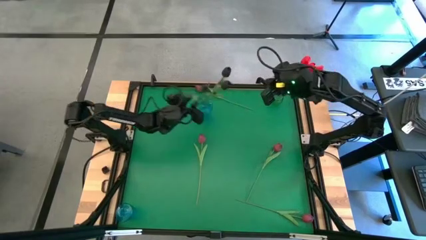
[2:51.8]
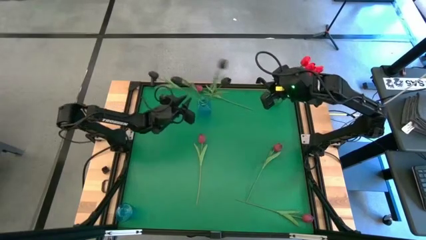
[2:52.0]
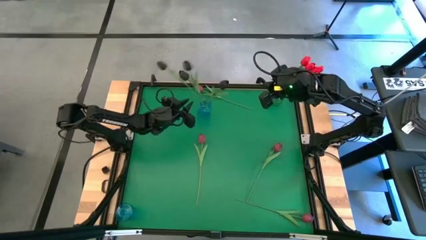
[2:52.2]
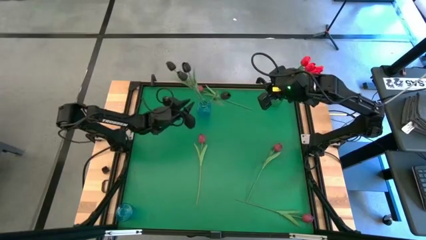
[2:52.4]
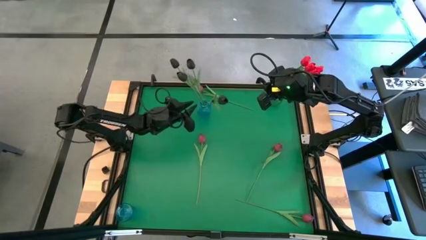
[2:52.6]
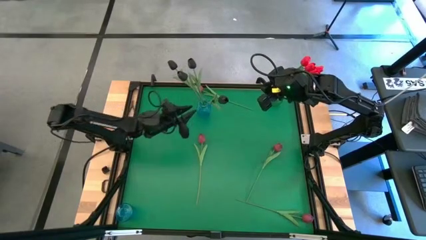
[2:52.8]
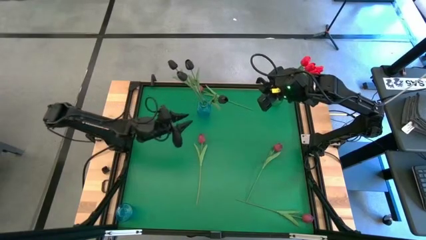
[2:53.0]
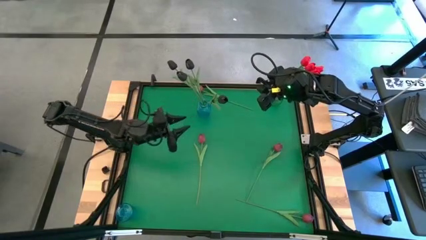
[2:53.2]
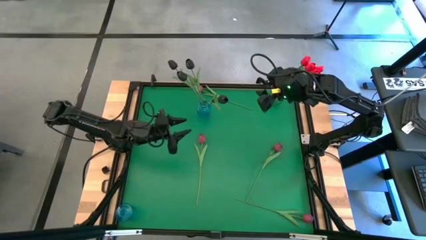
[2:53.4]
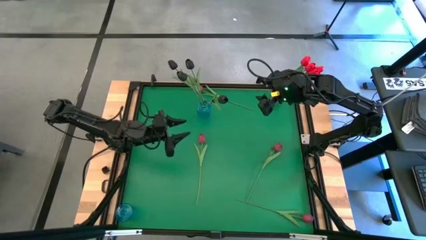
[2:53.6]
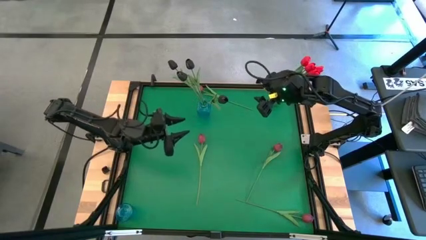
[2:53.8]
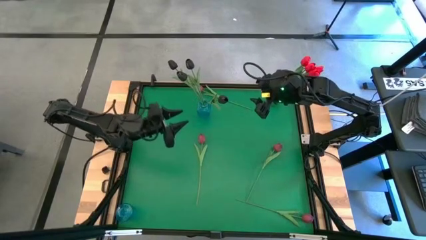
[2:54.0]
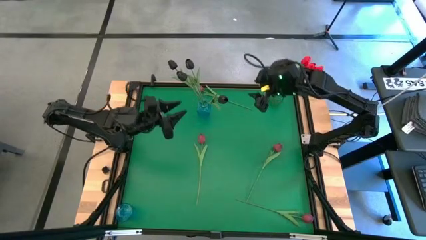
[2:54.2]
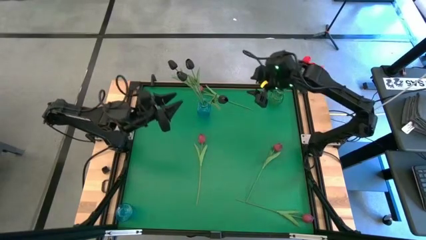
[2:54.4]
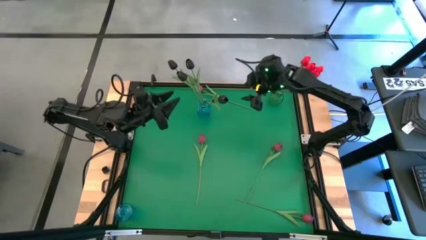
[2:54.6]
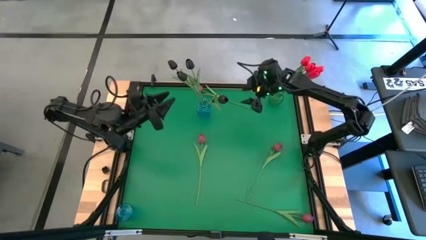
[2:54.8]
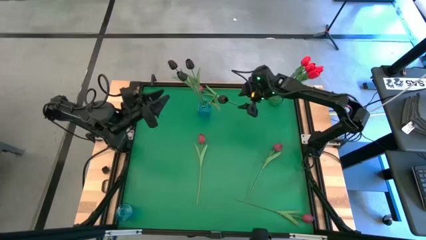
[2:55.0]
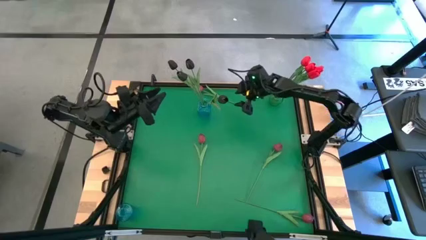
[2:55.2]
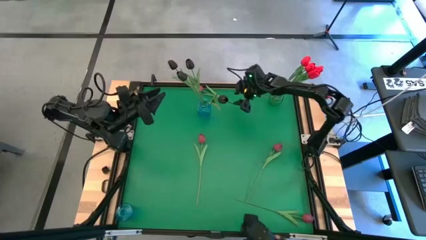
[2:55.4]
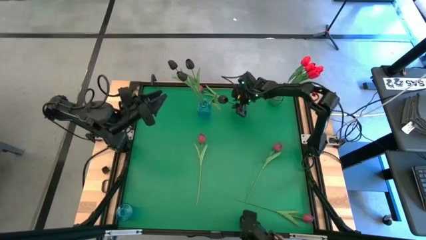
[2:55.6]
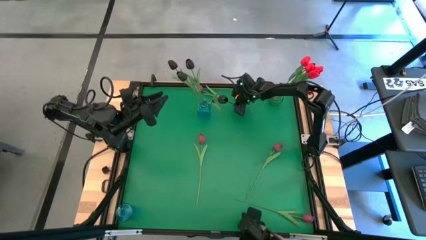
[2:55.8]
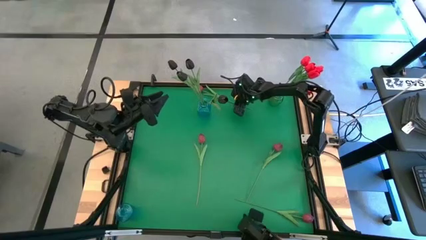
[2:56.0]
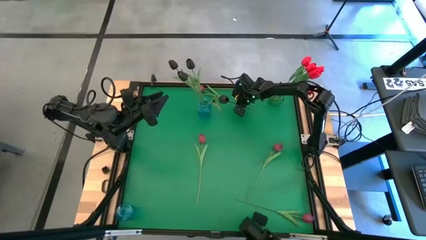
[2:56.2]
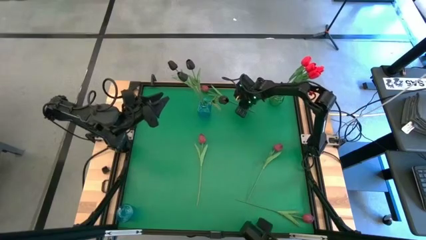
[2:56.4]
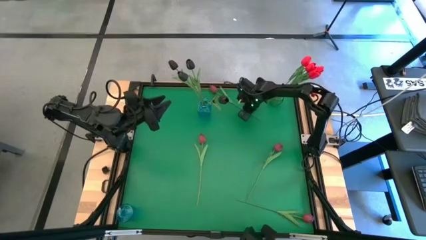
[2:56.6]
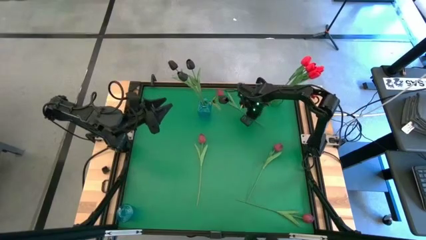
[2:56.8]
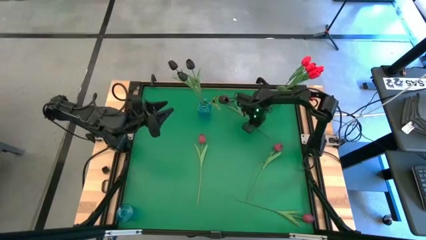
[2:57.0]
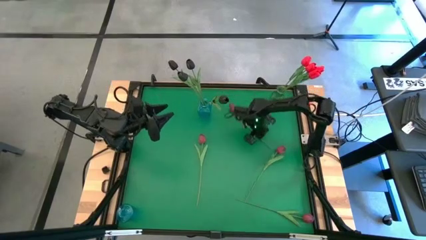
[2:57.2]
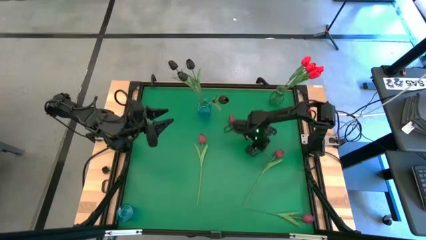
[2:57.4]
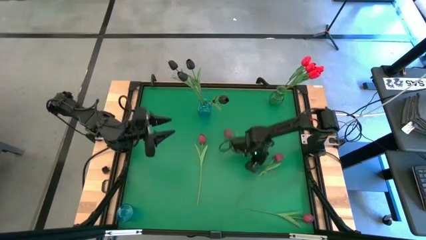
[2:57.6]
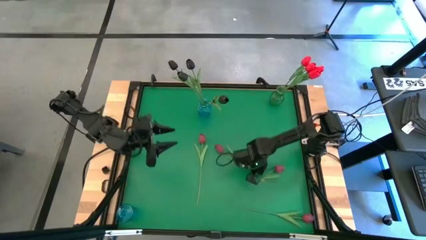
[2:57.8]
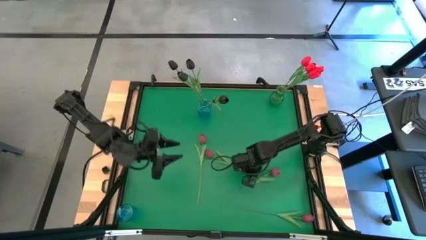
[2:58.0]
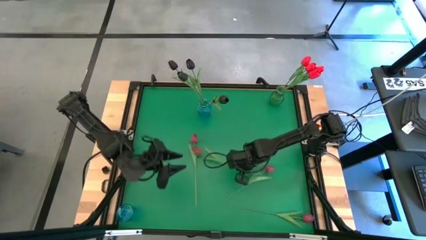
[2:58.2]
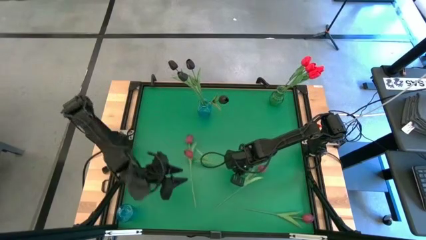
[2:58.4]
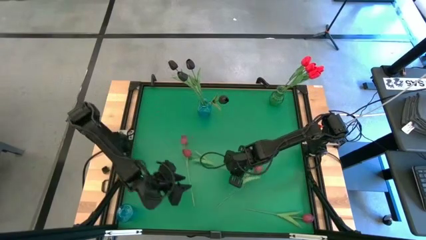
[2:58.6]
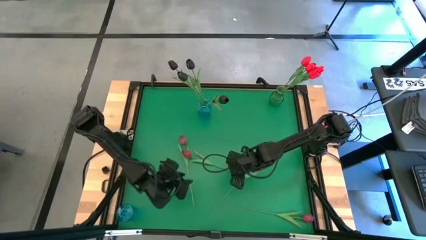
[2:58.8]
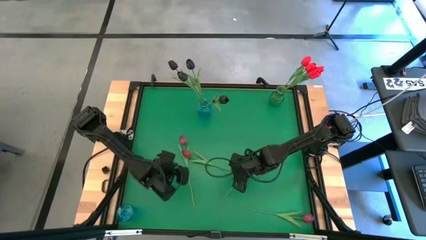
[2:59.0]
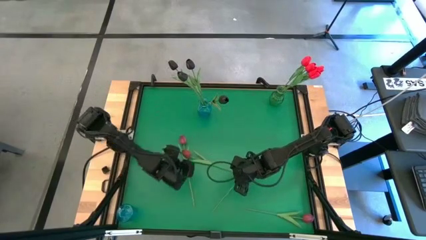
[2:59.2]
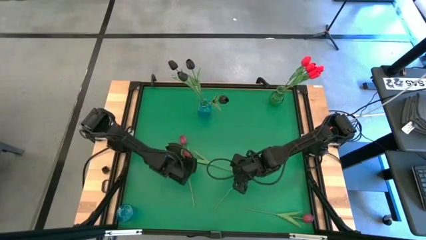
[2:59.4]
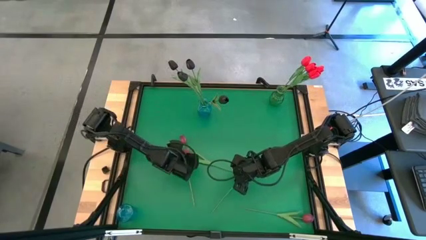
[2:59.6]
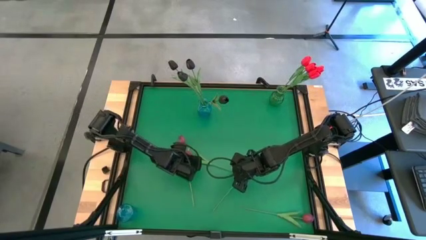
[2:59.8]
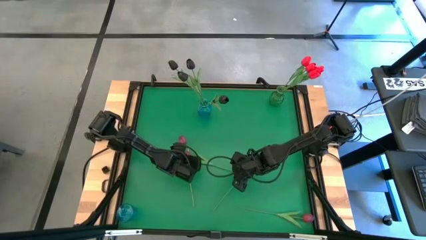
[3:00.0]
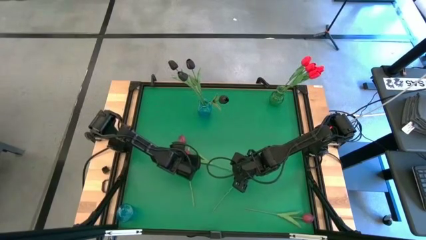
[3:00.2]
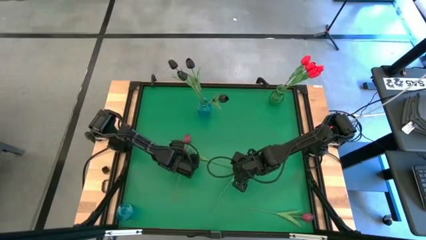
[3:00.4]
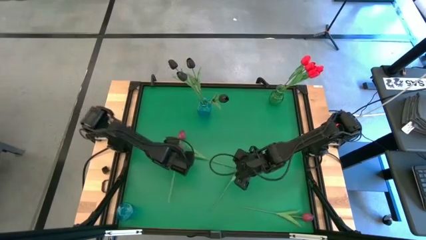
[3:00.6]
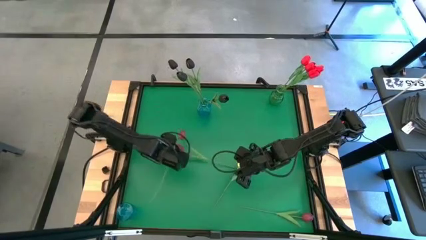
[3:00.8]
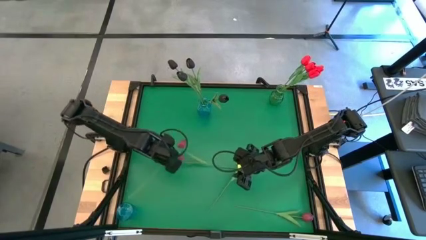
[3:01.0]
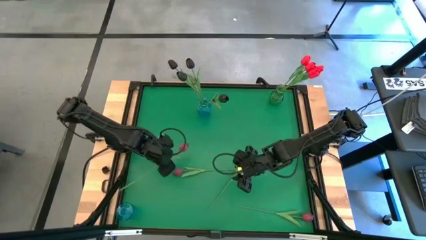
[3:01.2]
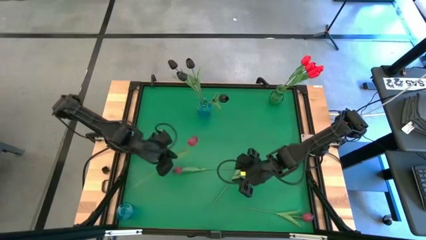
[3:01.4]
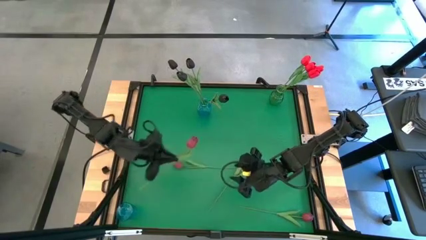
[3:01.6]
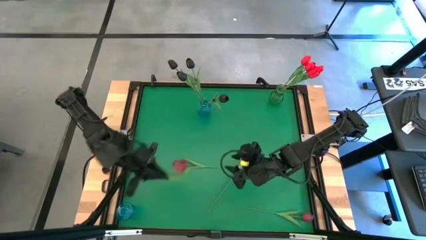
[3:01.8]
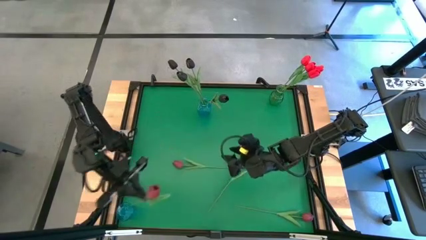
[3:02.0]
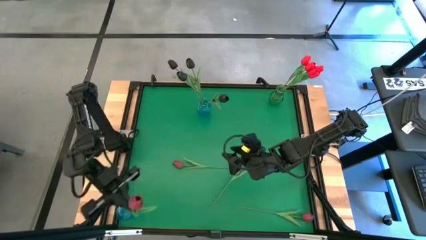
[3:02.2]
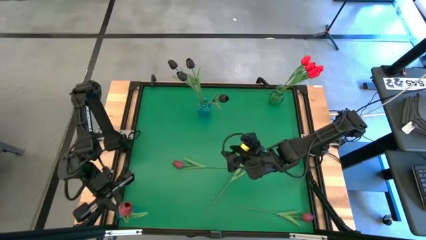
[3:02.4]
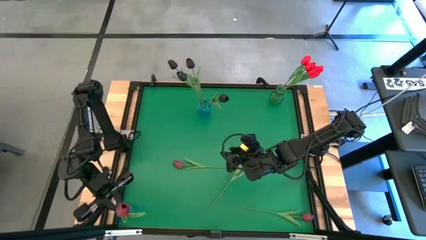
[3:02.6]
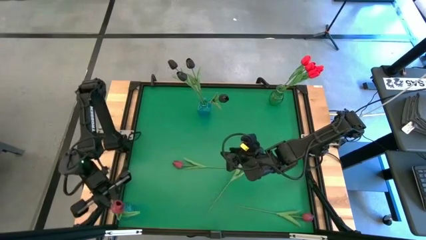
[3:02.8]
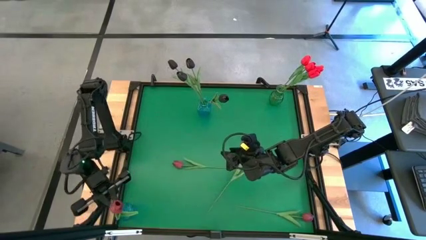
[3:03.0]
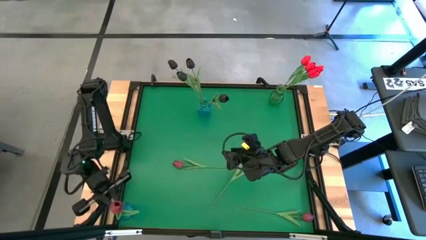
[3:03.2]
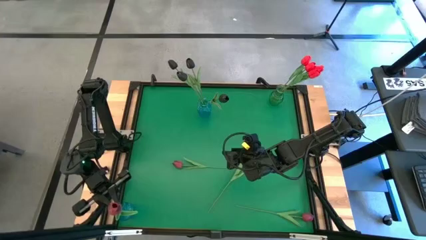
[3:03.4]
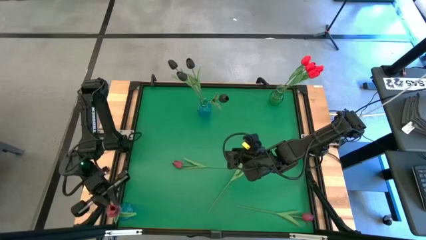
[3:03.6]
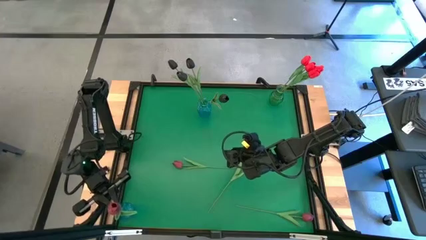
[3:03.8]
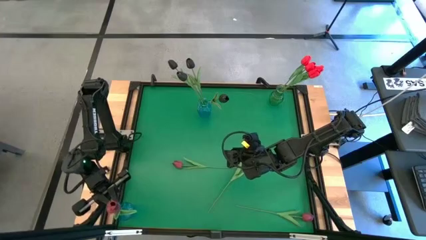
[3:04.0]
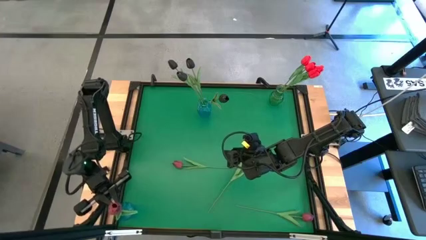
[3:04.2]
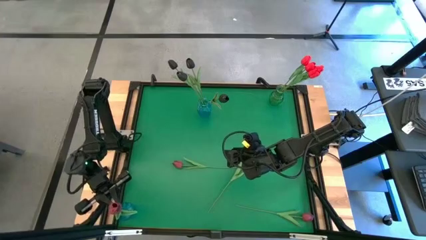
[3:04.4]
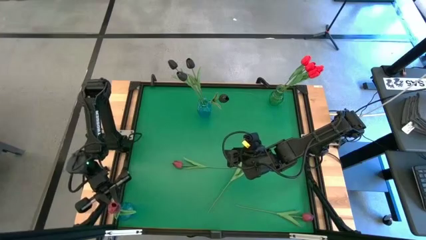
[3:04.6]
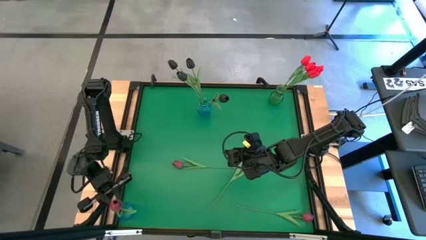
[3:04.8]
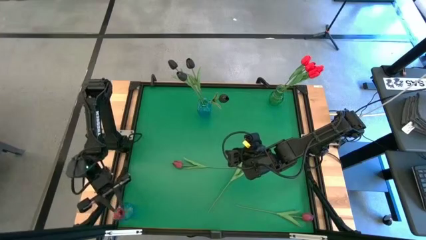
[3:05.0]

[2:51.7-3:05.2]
Task: Sort flowers into vase by color
Put the pink tulip into the bottom blue vase

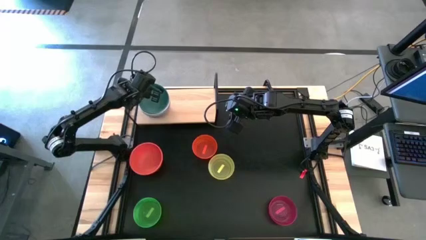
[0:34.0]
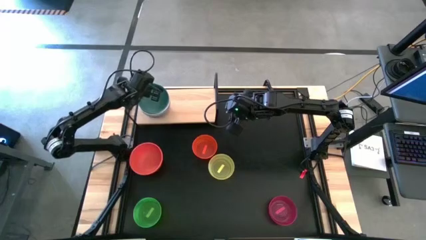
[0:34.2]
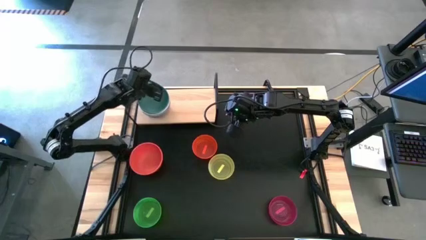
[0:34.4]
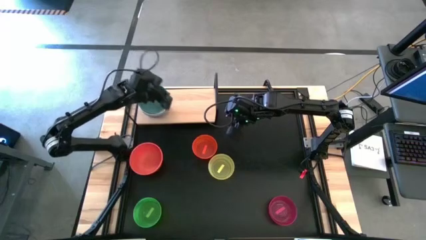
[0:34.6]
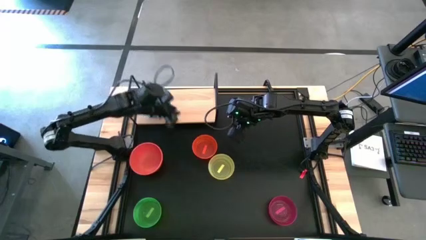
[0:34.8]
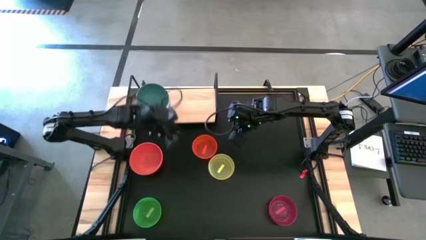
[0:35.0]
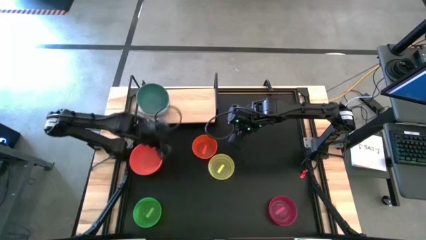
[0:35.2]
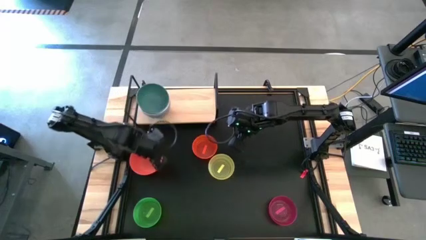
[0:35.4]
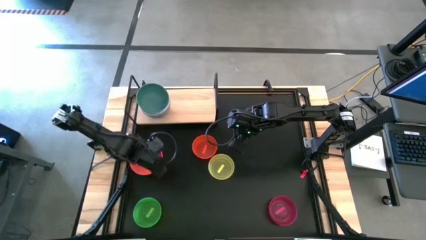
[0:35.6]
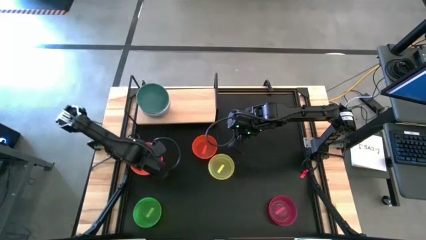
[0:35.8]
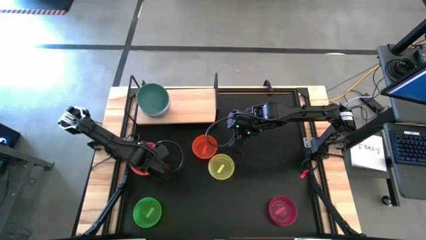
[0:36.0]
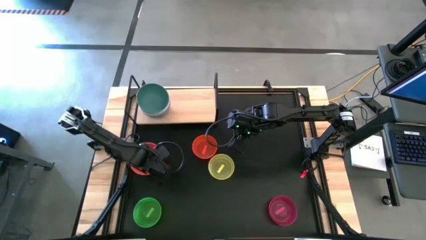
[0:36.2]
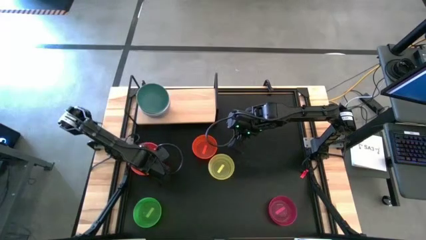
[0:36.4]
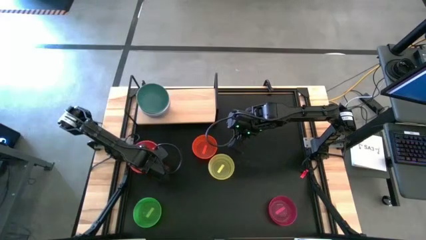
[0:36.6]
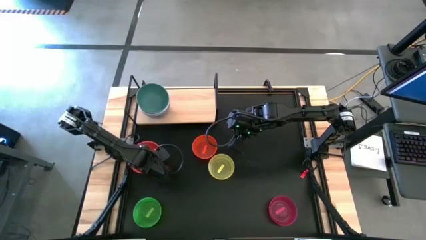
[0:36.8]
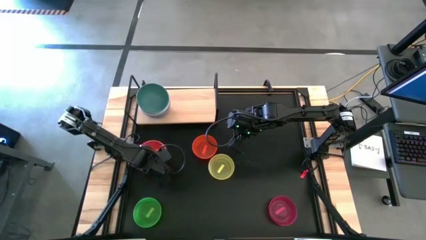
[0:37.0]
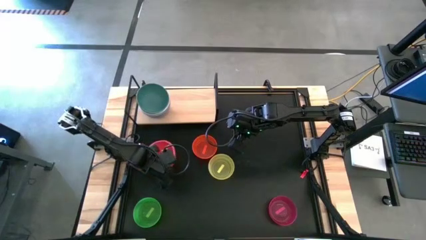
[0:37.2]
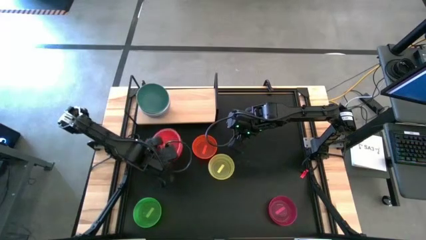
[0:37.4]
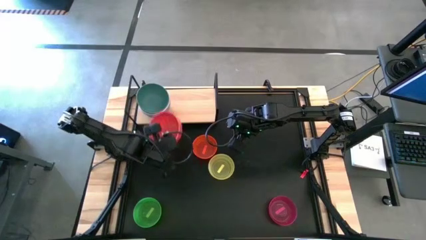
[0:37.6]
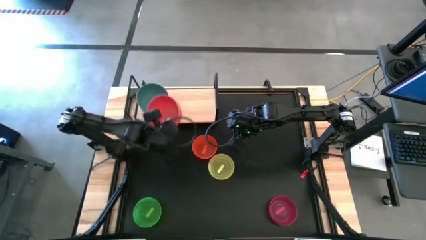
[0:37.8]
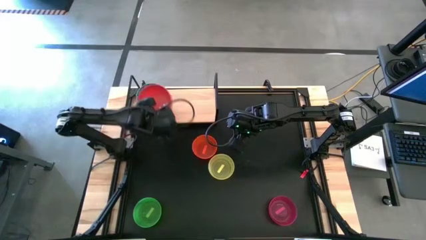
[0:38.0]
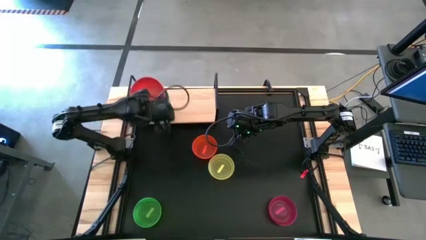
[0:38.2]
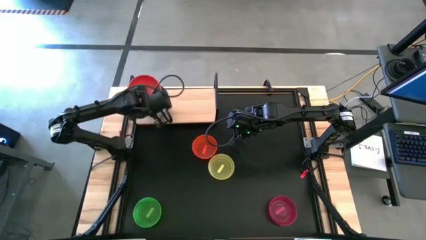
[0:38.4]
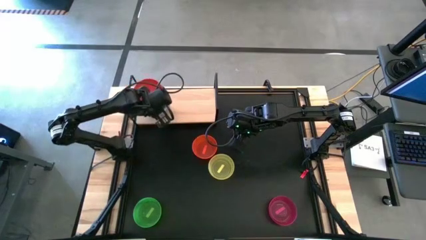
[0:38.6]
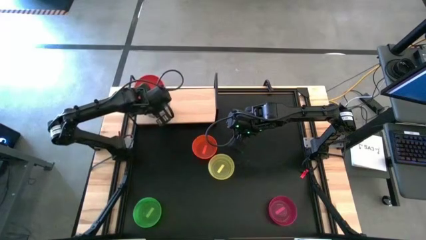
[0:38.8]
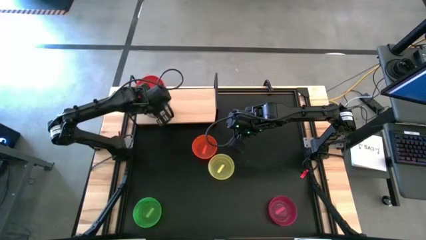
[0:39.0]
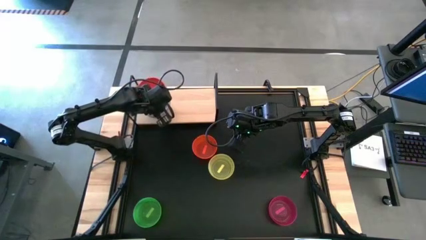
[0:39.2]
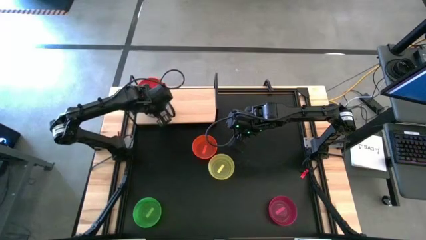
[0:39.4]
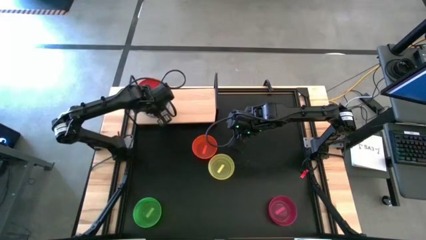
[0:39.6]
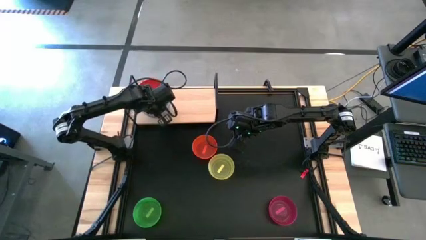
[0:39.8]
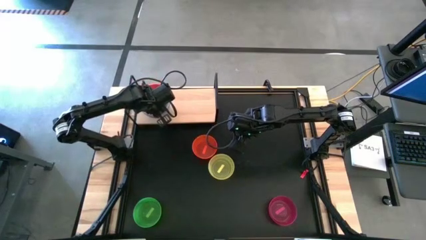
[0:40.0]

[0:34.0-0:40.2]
Task: Place and stack bowls onto a shelf
Stack the orange bowl on top of the green bowl on the shelf
